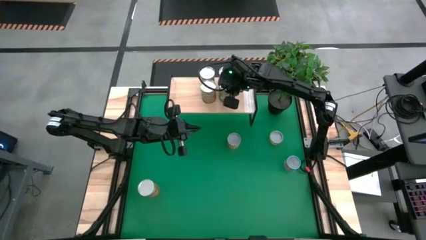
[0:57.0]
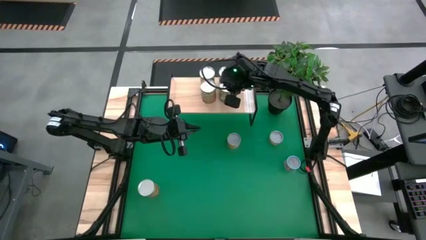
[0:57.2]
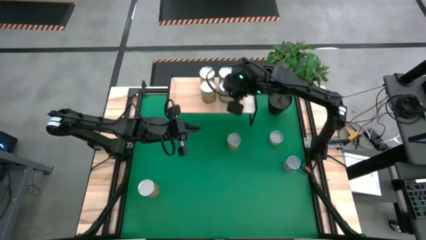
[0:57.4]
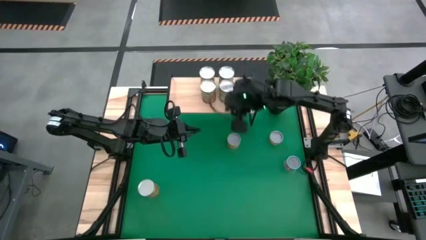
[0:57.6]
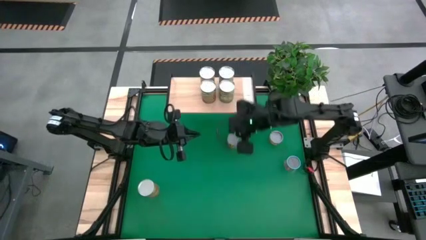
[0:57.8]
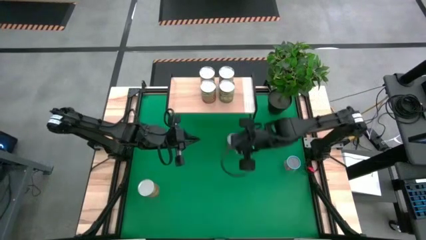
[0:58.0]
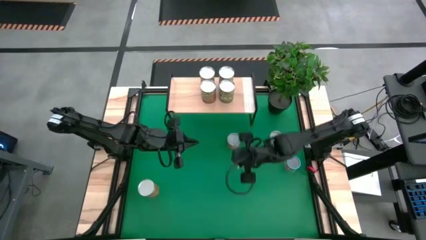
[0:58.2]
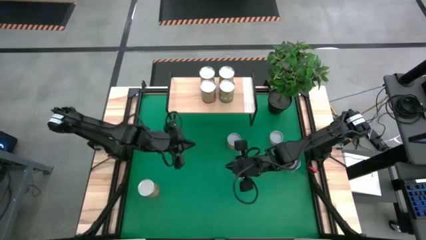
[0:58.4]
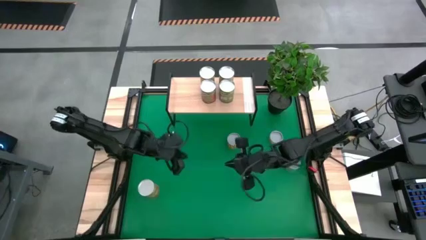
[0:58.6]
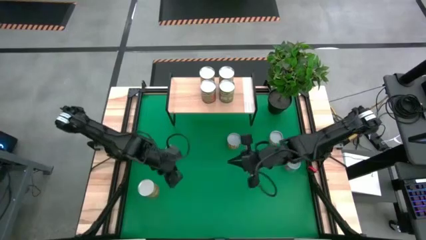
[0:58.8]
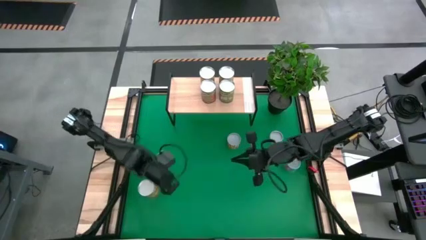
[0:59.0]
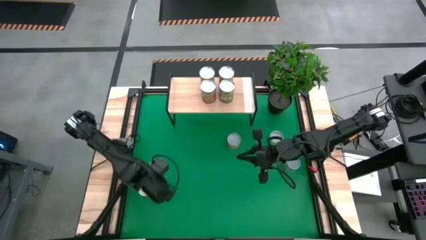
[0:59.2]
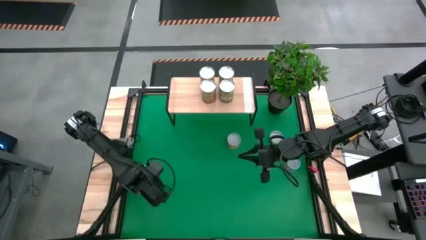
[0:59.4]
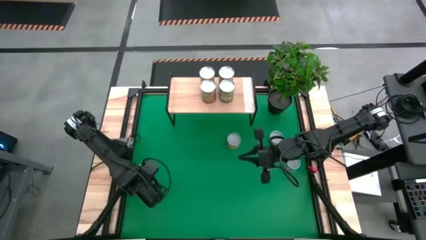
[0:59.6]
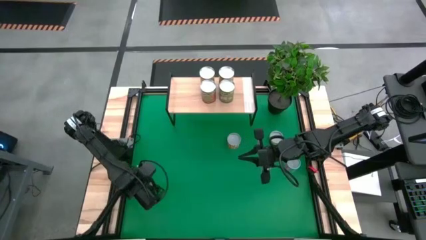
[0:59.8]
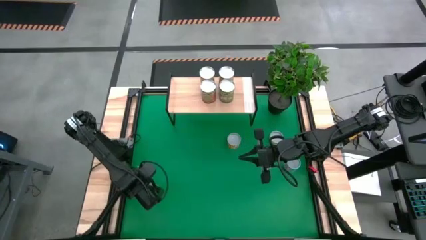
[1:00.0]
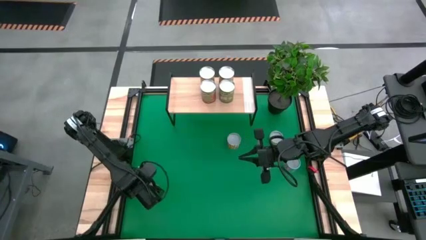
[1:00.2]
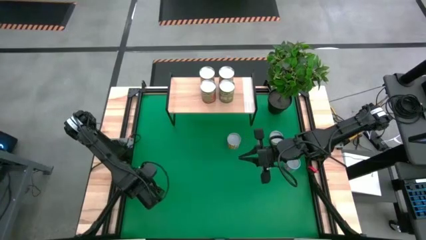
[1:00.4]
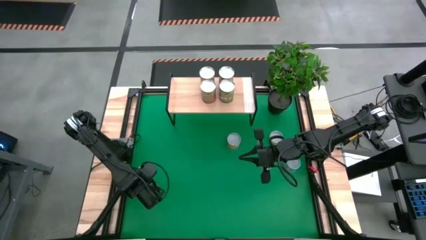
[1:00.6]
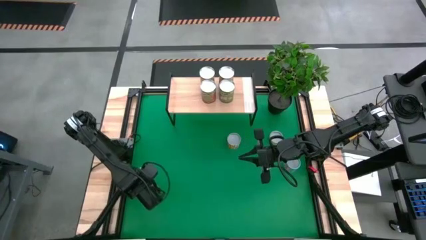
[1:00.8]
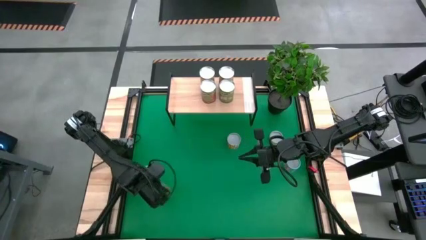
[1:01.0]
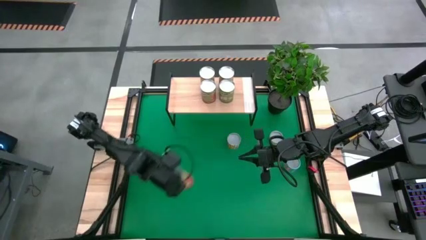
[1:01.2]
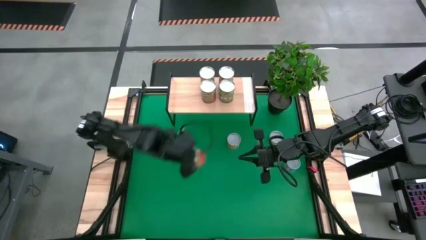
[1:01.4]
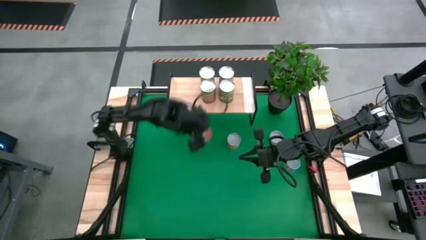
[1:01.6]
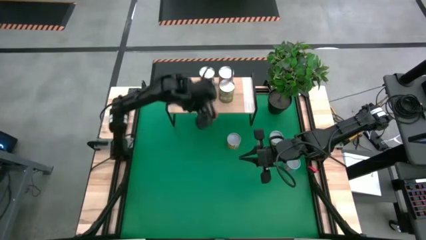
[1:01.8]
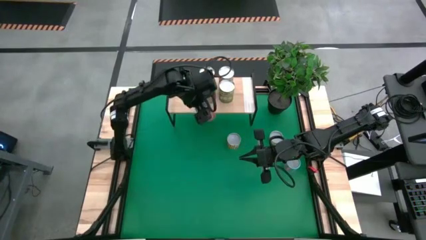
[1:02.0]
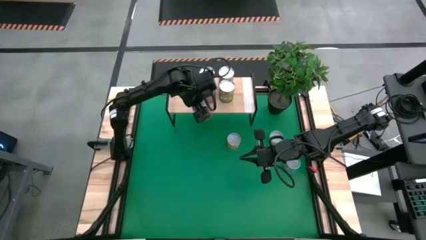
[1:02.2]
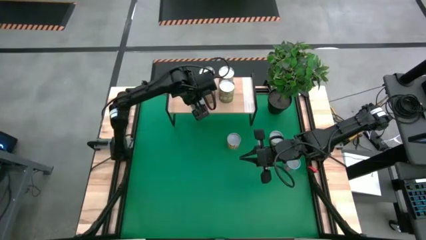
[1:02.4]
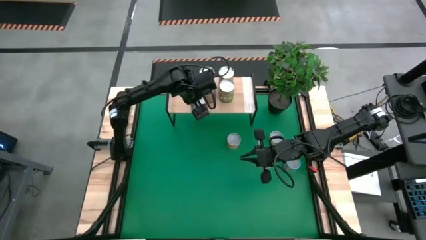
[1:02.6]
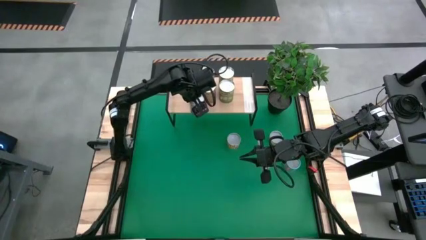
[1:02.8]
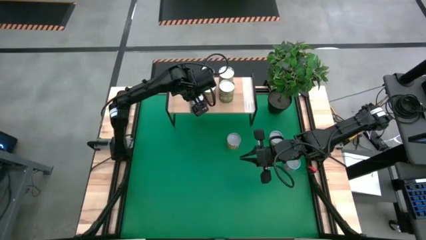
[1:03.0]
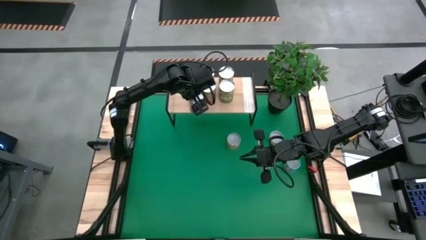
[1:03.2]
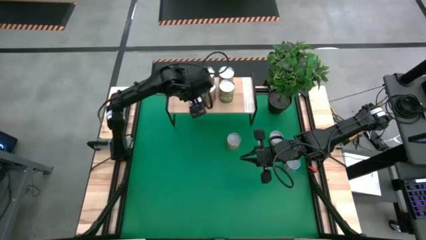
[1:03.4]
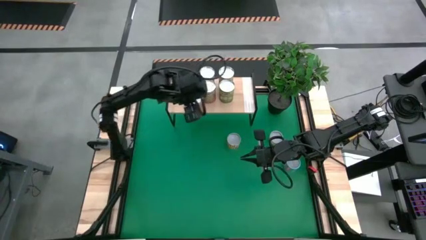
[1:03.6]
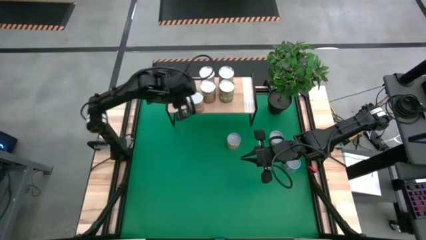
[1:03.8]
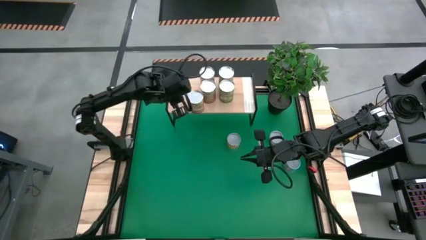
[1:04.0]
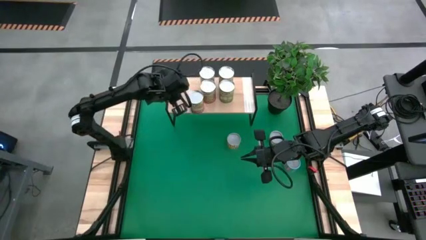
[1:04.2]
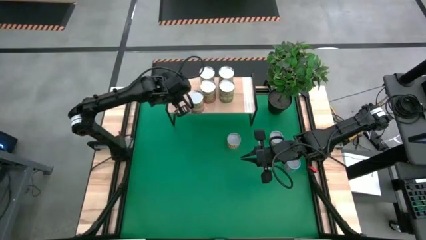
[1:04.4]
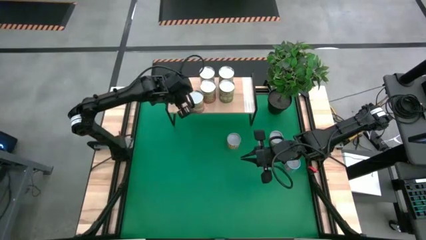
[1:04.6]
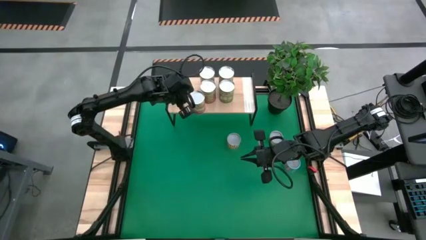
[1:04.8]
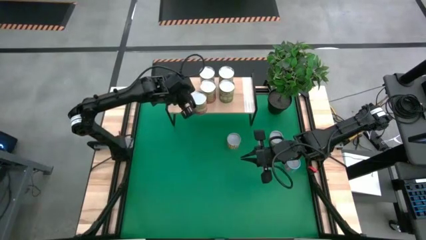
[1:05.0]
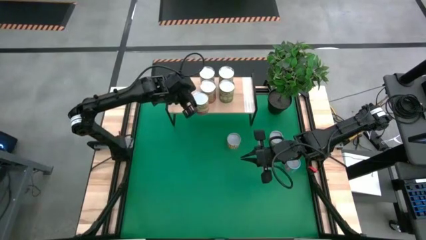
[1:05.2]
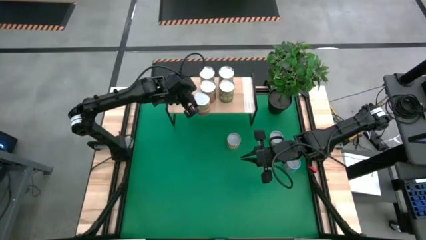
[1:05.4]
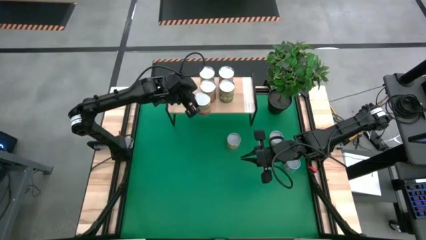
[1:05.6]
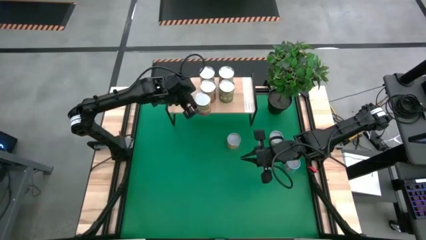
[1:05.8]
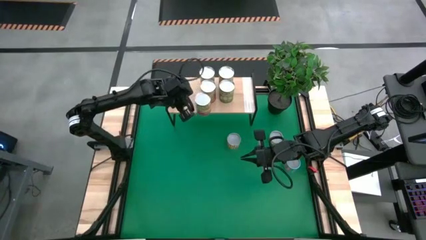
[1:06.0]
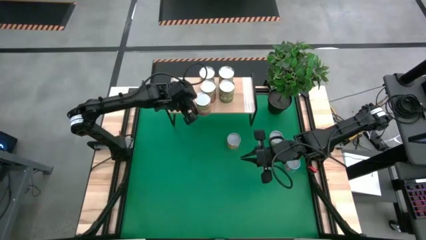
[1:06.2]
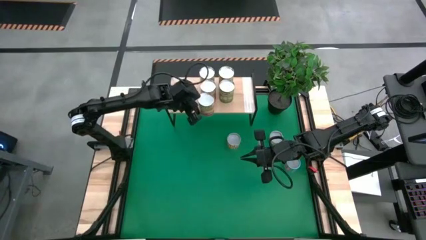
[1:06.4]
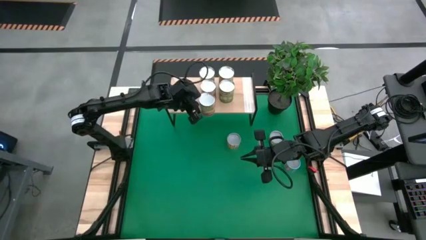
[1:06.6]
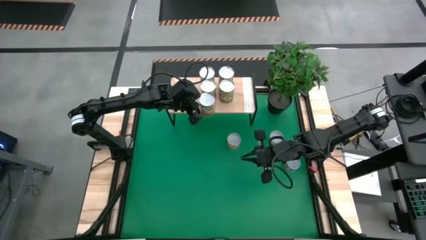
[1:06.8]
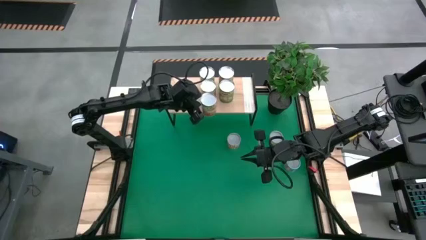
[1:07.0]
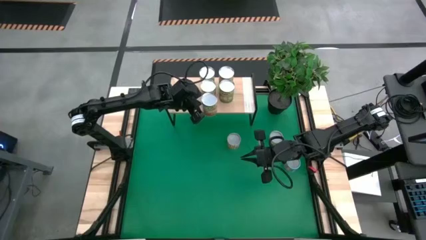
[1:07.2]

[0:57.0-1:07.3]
Task: Pick and place cans onto a shelf
Put the canned corn on the shelf

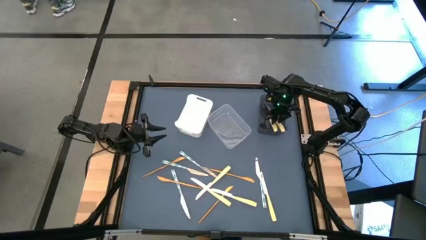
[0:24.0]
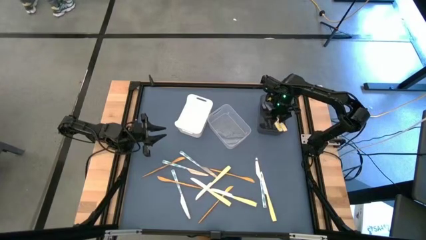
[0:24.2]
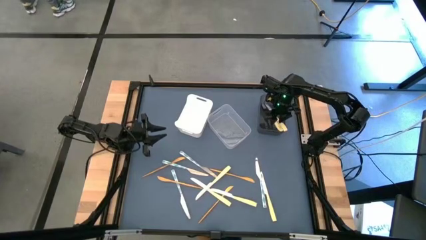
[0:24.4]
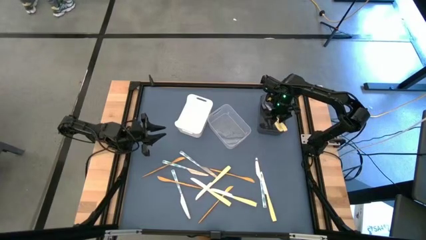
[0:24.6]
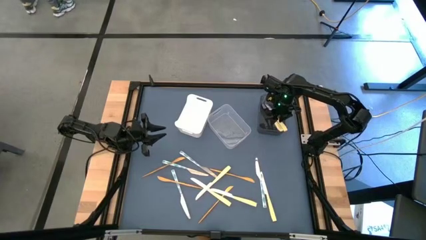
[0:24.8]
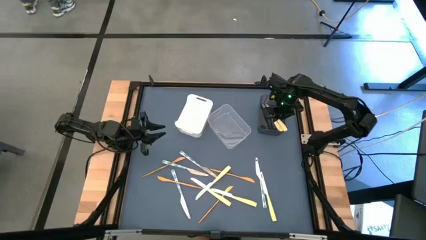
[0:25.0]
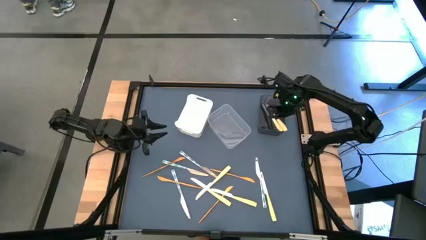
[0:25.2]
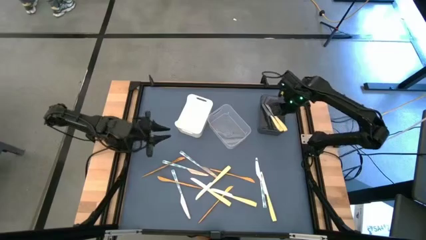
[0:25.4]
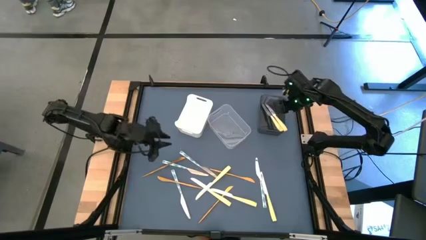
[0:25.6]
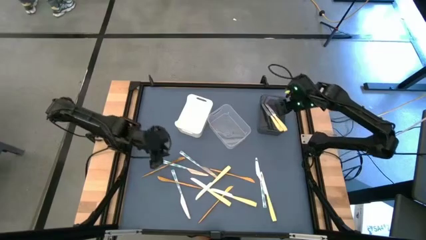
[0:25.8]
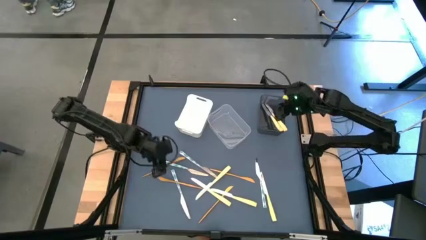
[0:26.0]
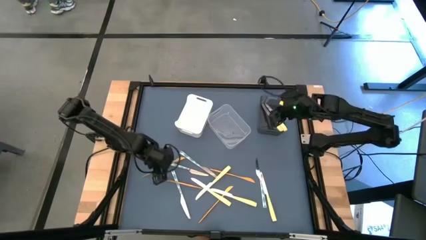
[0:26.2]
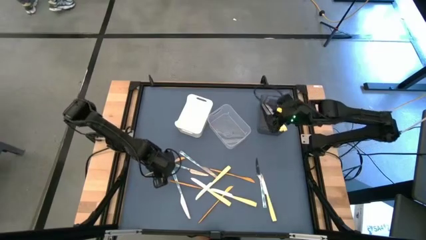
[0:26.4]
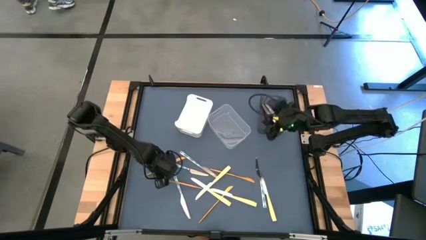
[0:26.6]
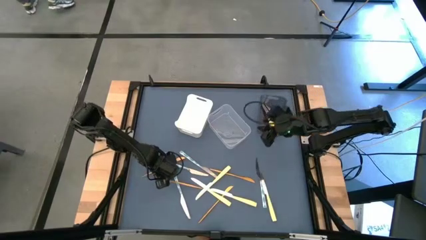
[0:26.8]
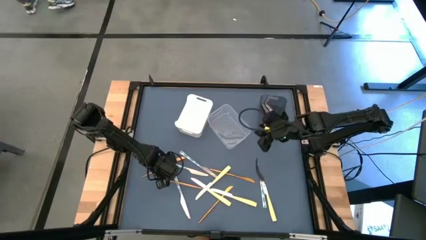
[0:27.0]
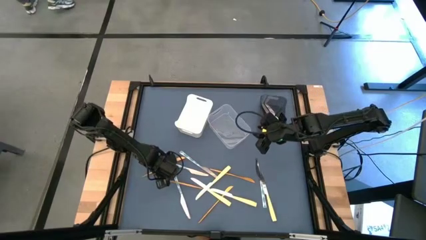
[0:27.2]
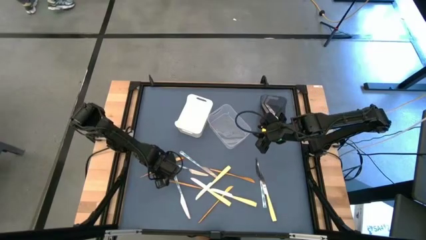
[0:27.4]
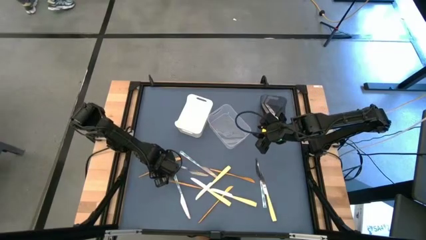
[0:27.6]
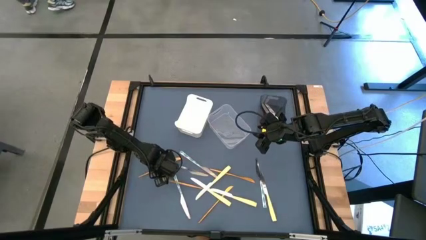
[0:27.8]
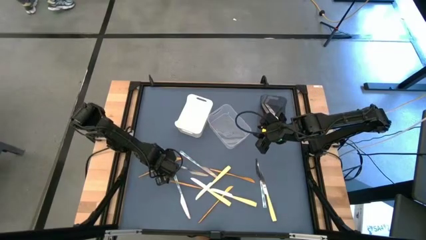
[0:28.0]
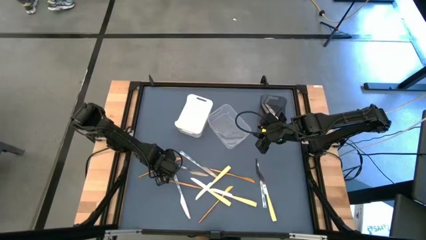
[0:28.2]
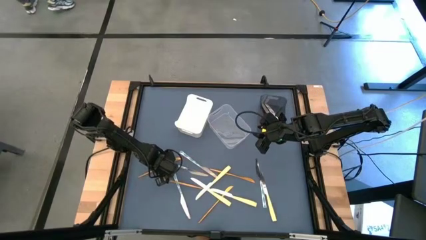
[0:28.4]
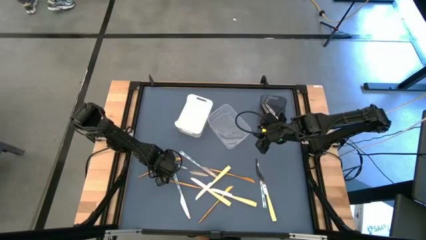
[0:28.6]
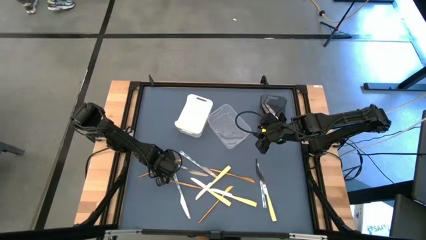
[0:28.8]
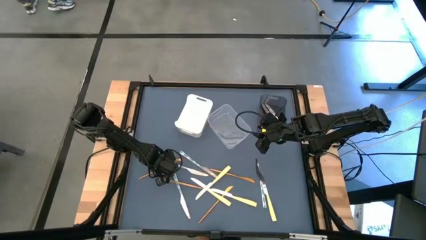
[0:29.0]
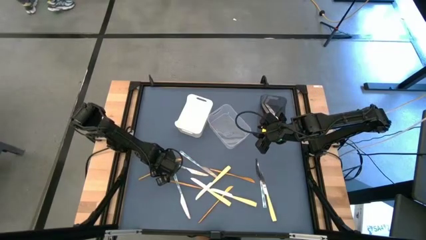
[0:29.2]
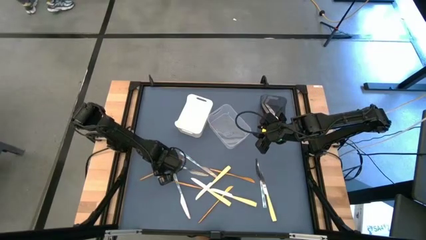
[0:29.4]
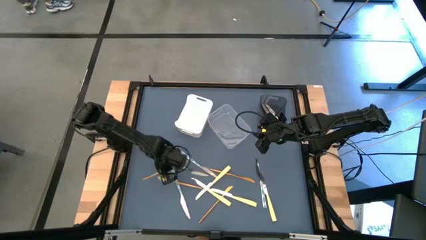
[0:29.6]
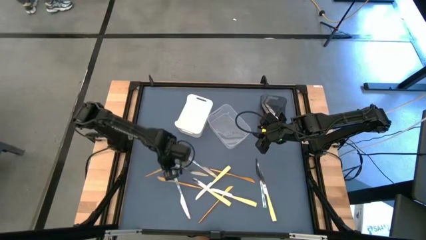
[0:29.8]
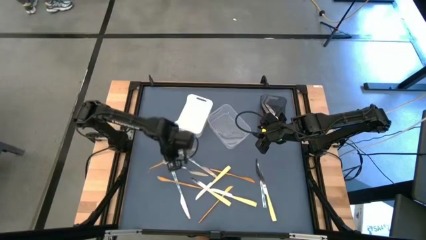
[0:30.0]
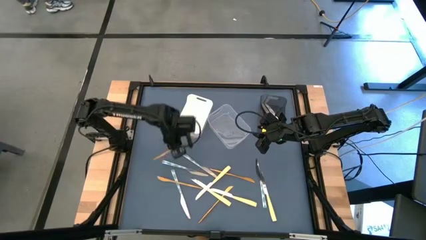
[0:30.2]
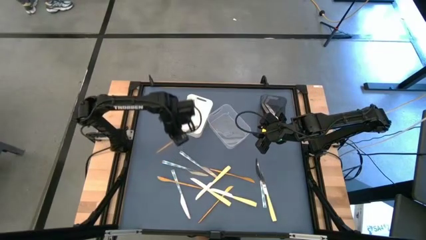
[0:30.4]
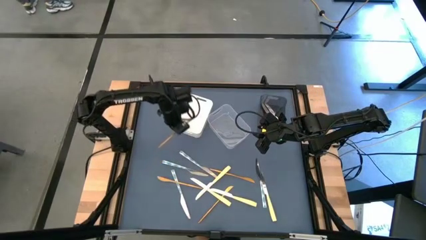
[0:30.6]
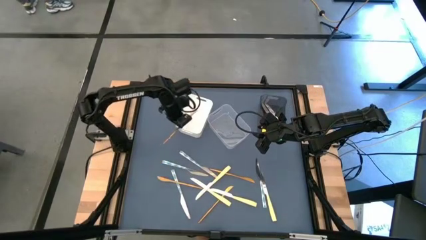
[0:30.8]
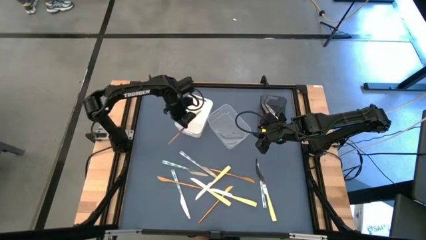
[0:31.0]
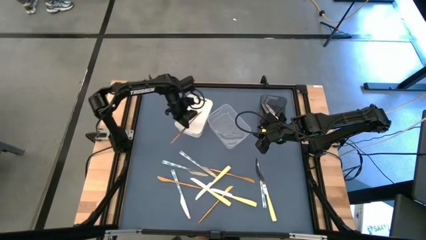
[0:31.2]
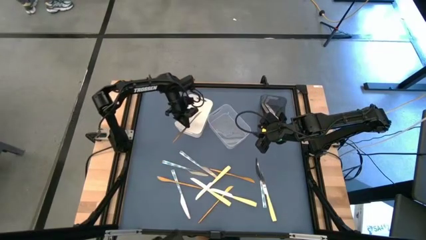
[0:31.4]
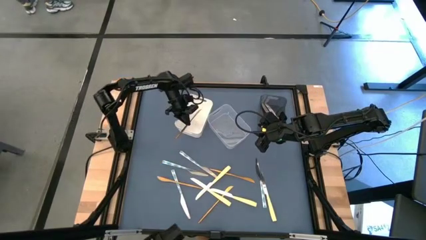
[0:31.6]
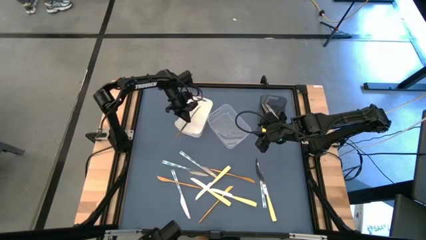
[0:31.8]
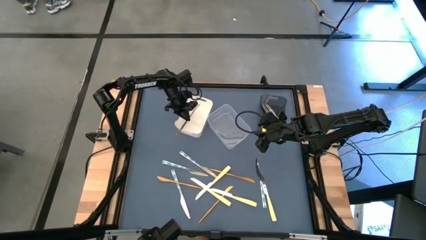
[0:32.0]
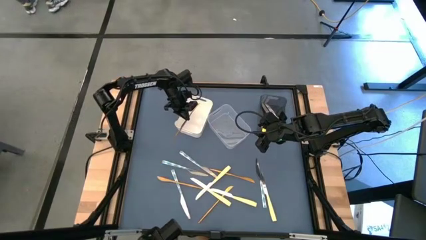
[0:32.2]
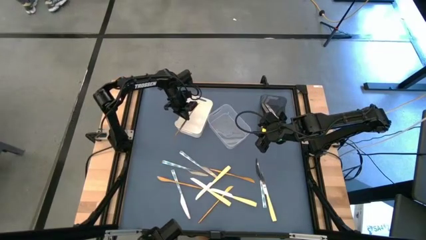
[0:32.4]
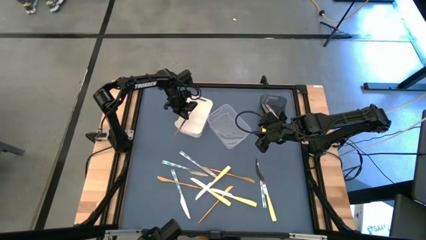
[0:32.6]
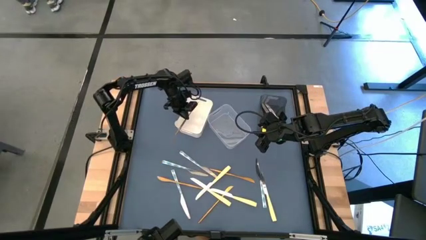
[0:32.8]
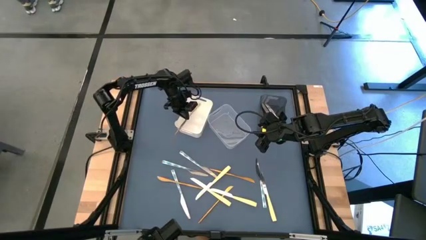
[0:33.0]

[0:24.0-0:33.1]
Task: Sort silverware by color (type)
Put the gold knife into the white bin
